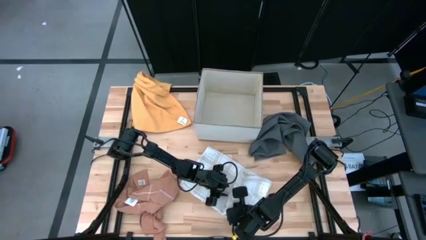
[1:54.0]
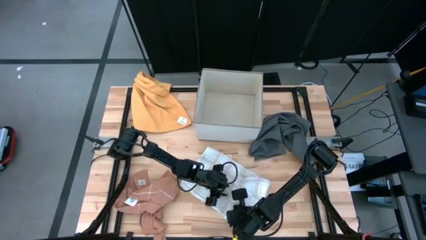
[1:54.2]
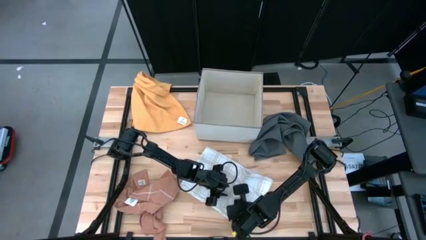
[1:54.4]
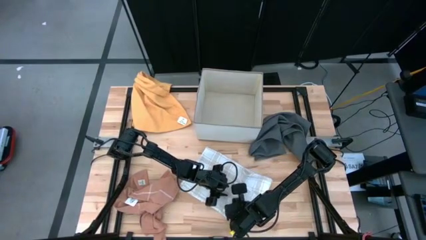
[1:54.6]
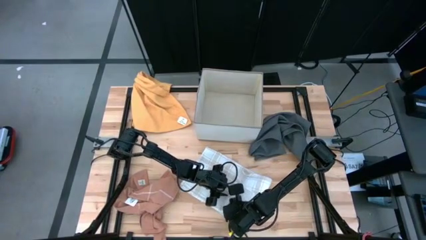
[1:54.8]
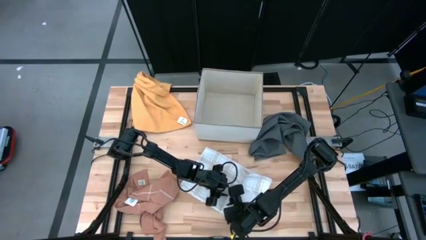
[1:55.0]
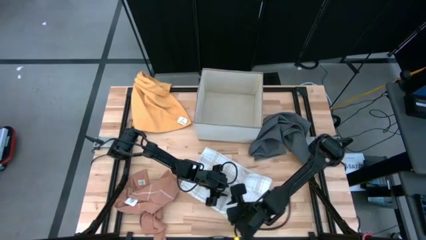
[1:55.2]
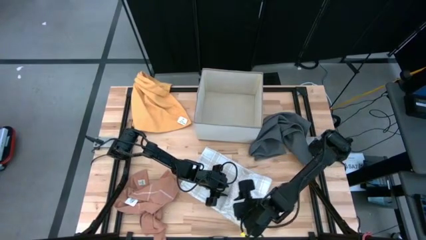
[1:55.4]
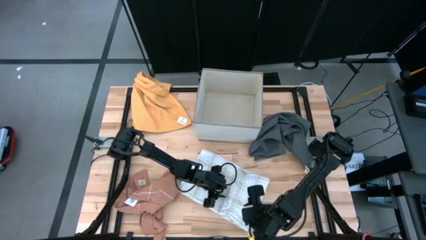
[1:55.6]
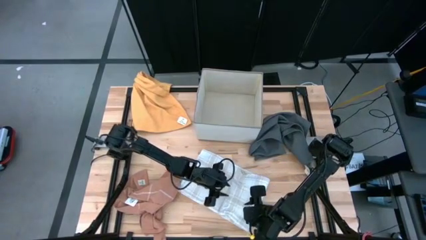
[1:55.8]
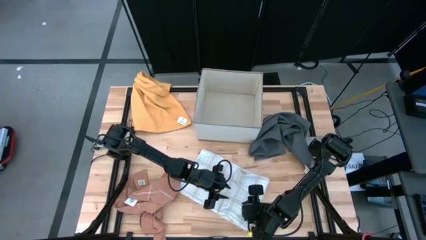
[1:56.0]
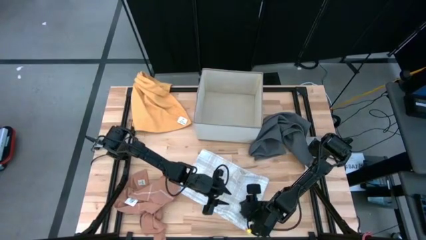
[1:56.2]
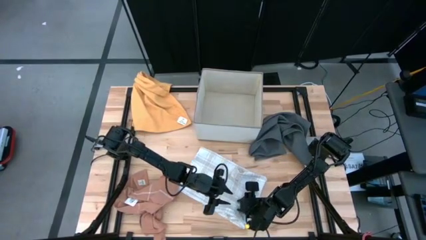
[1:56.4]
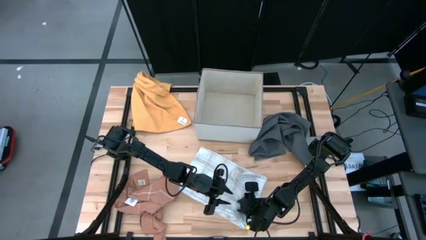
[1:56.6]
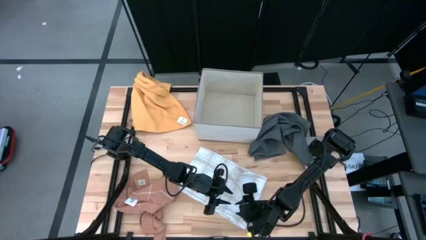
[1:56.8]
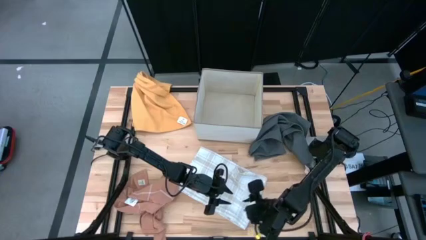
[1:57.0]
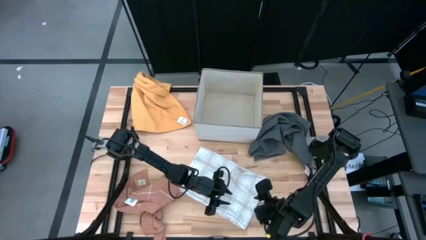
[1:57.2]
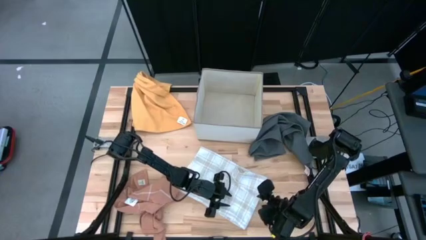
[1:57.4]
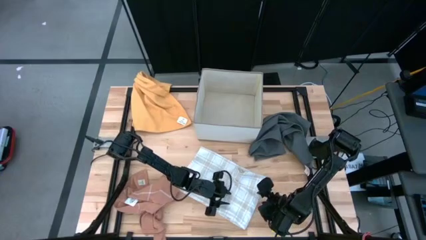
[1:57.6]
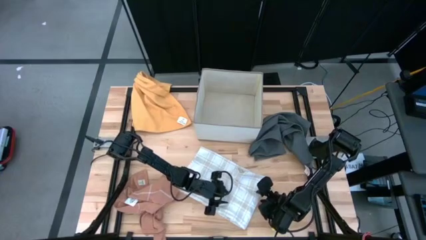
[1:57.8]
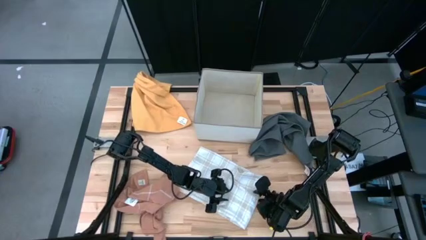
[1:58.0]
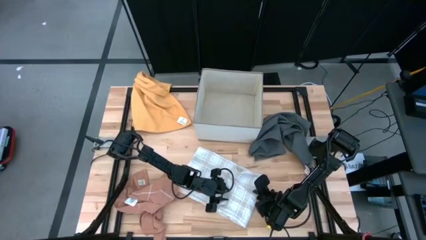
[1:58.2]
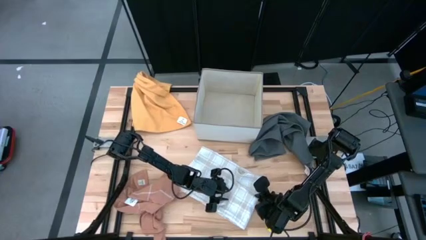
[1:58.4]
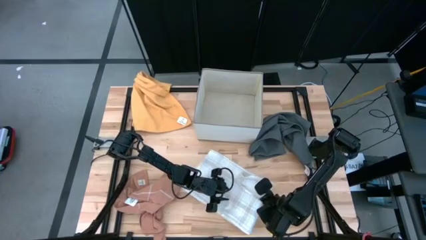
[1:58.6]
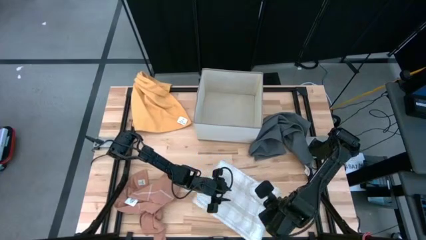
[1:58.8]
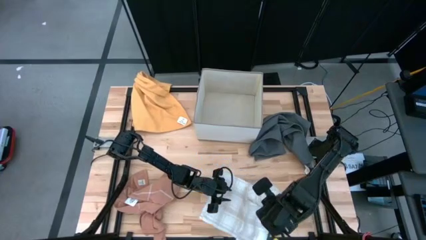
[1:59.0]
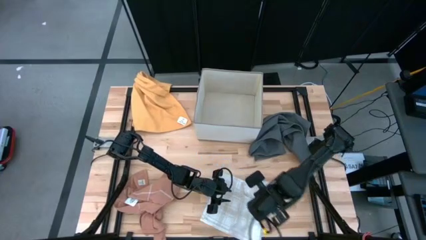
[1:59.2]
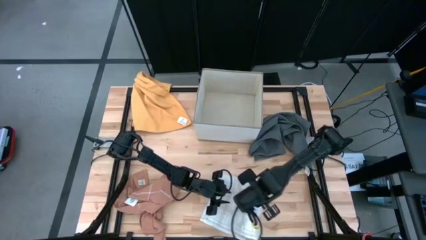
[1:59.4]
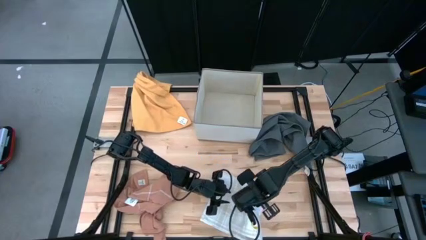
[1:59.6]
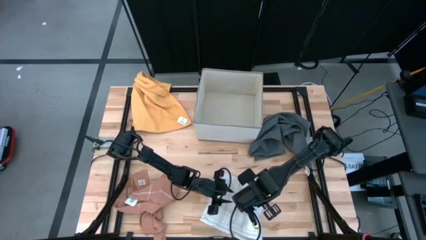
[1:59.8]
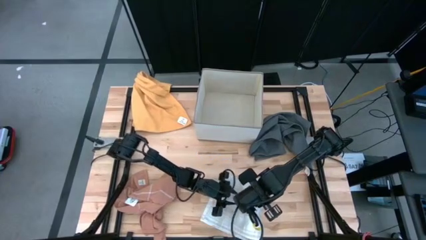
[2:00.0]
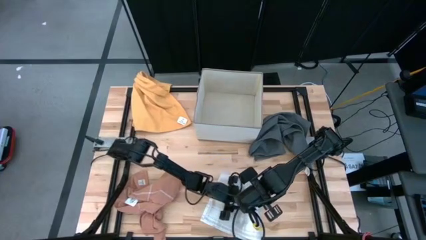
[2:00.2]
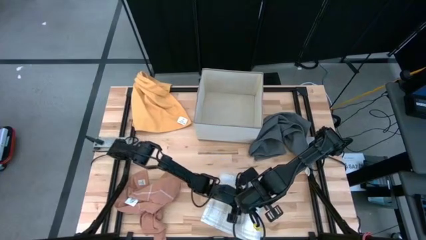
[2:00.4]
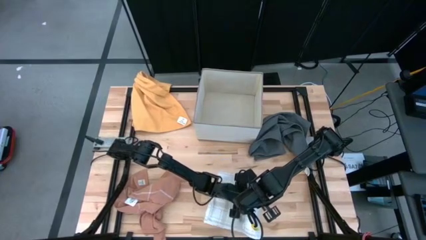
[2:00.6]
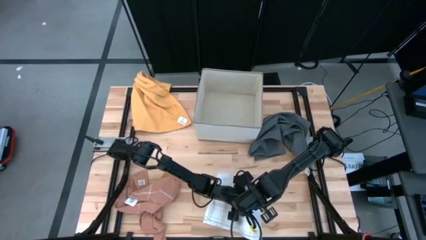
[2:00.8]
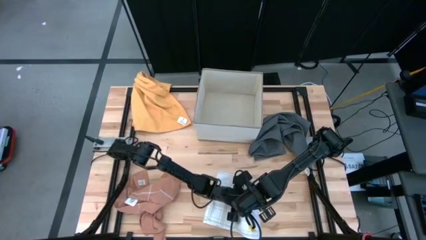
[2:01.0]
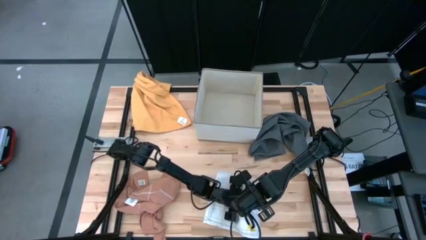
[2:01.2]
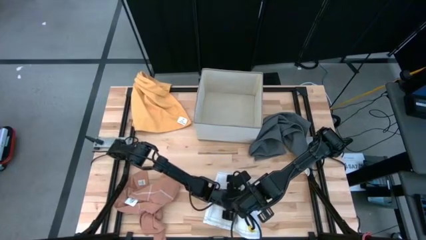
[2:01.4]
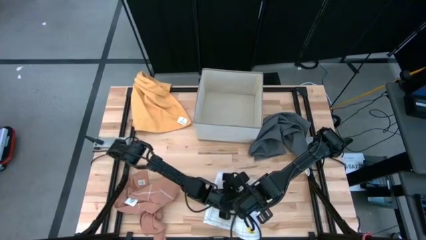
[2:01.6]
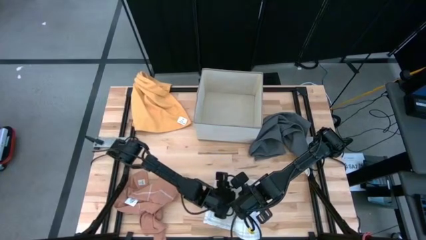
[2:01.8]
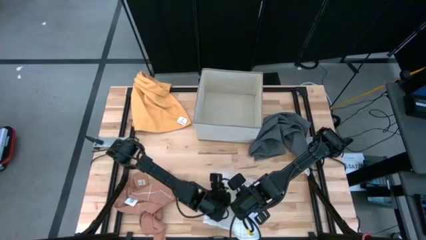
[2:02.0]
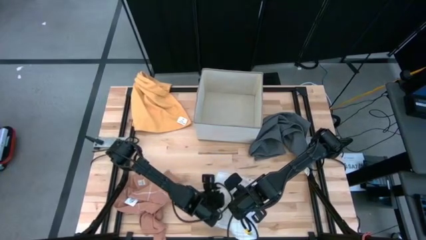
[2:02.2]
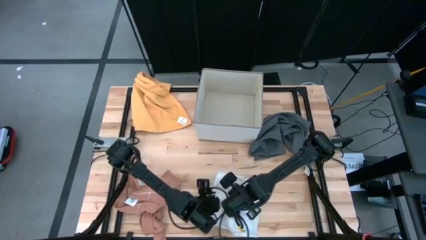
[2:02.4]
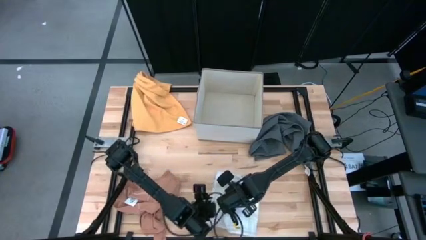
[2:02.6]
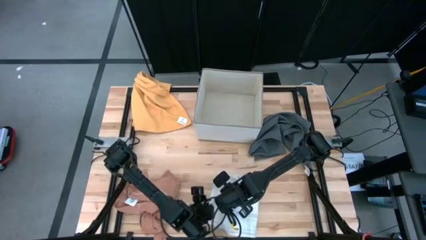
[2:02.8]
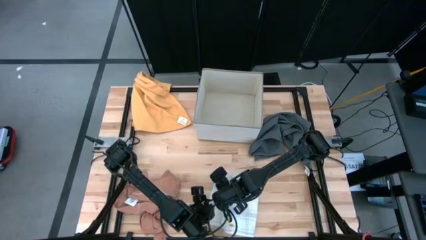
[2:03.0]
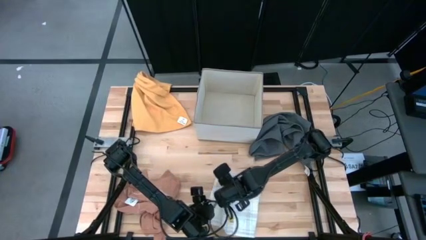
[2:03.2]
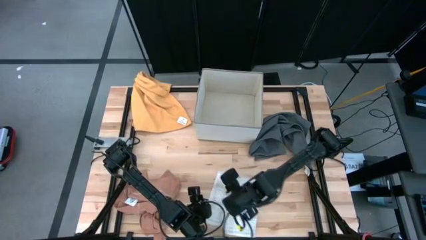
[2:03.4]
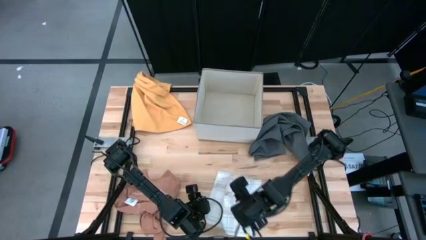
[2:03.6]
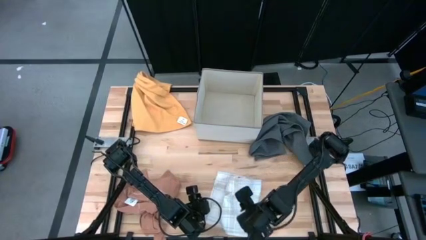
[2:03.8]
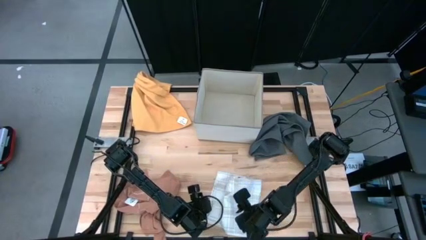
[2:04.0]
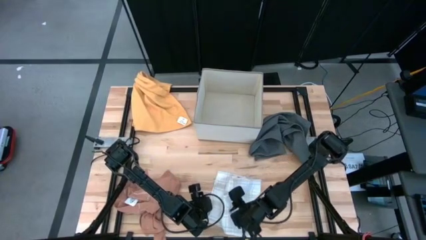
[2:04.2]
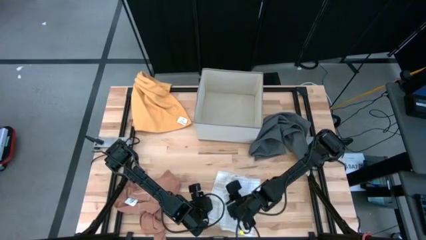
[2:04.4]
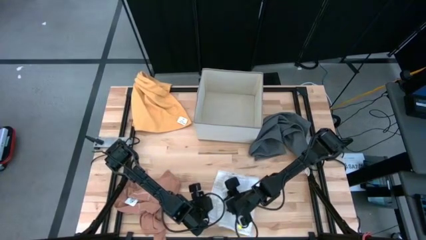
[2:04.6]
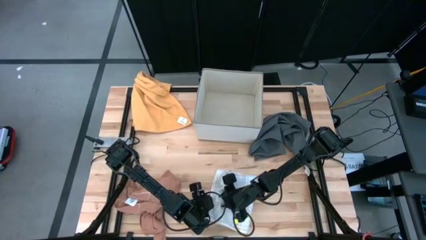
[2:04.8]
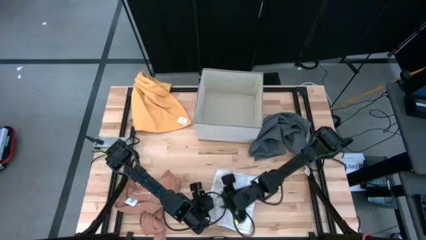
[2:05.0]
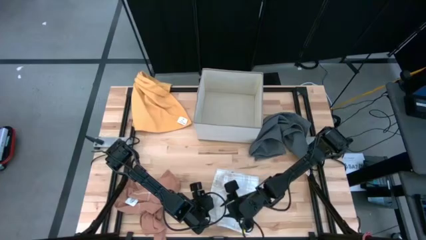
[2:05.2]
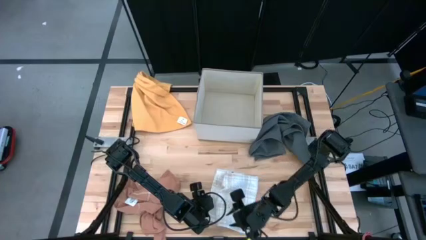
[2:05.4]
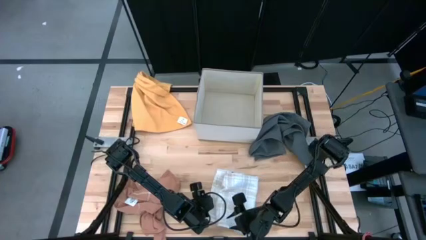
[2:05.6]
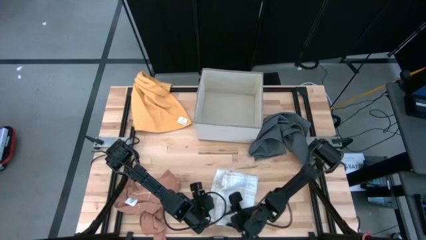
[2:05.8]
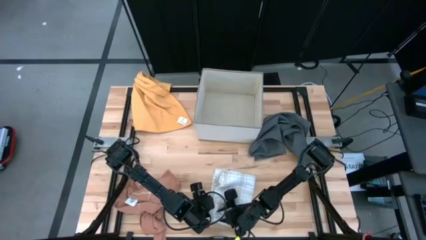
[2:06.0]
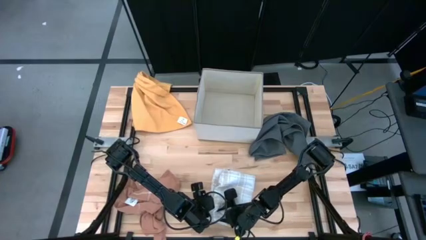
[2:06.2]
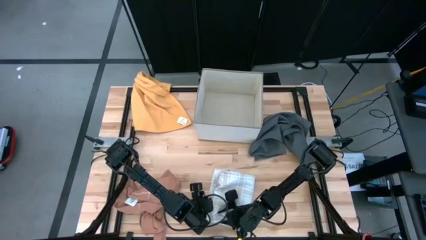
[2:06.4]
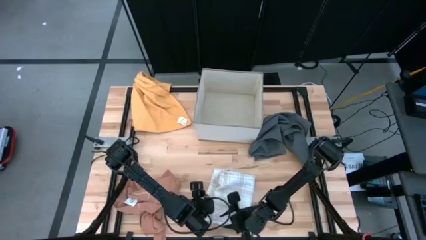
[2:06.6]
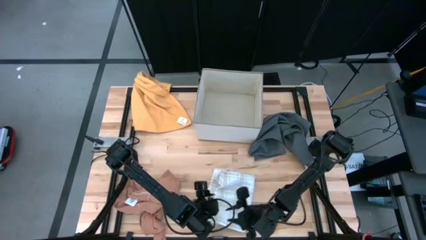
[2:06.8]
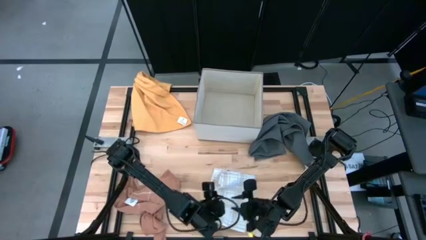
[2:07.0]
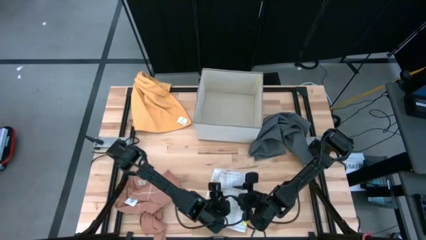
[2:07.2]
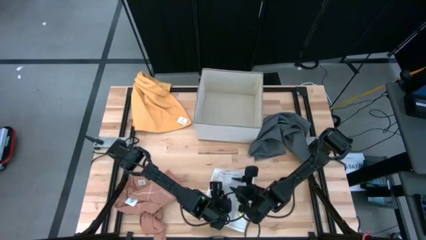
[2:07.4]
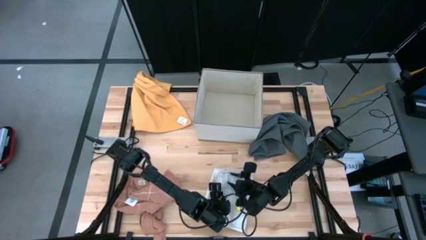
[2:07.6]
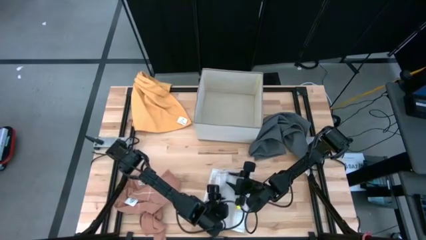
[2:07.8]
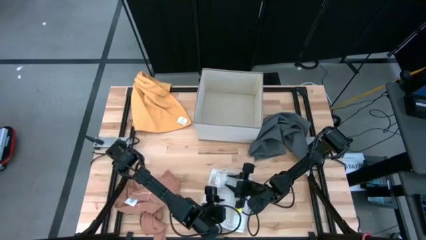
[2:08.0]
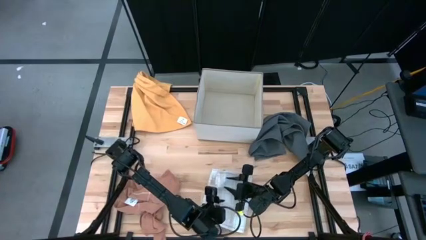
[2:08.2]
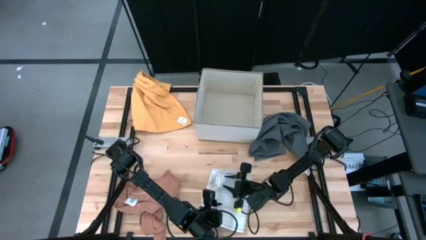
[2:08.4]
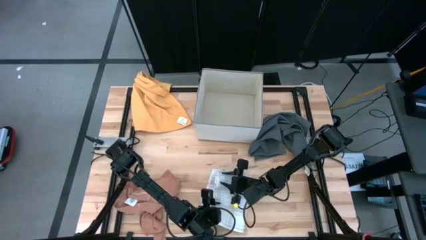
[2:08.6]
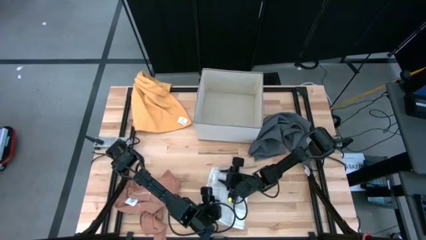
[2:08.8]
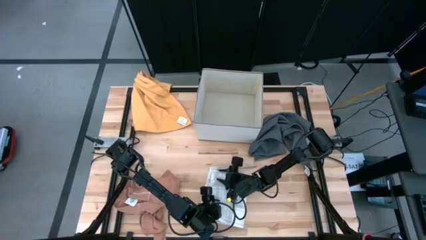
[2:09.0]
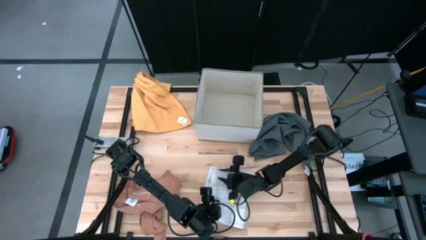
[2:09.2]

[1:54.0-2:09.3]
Task: Fold towel
Fold the white towel
